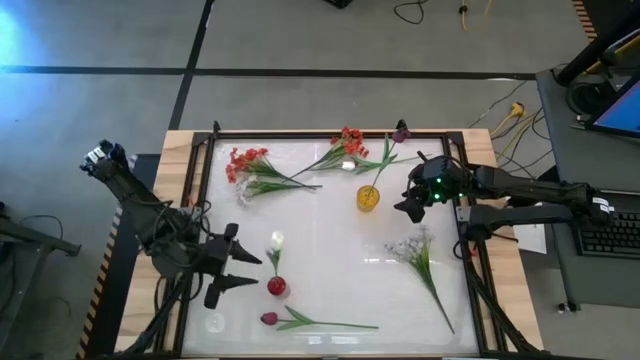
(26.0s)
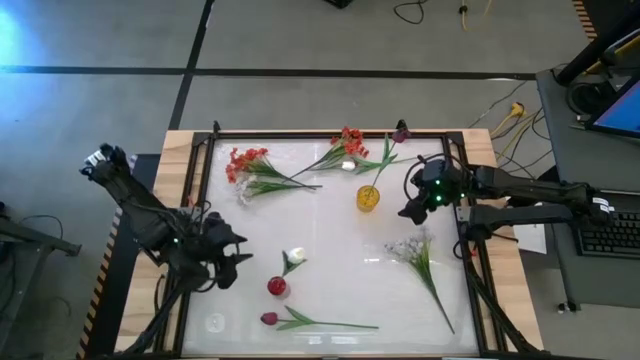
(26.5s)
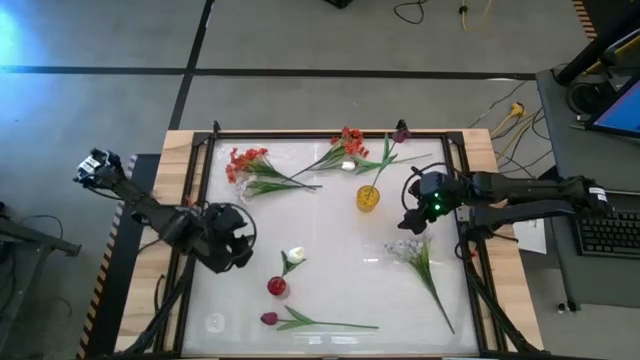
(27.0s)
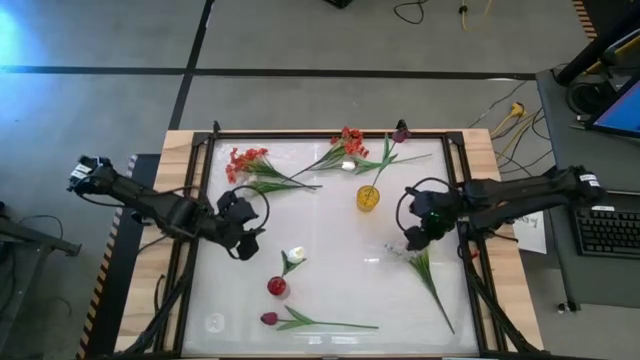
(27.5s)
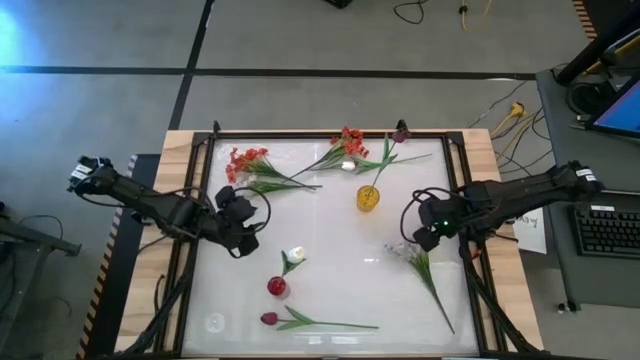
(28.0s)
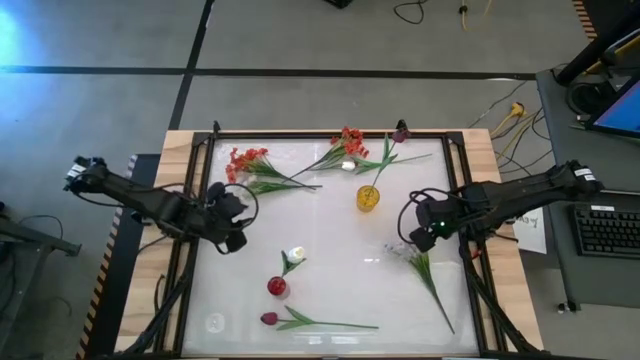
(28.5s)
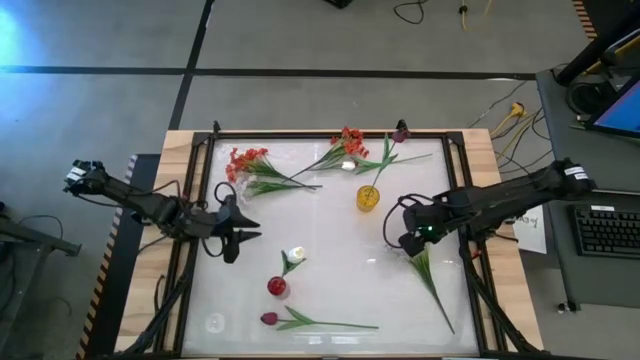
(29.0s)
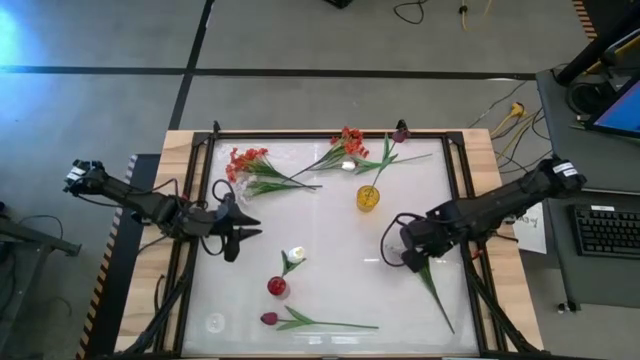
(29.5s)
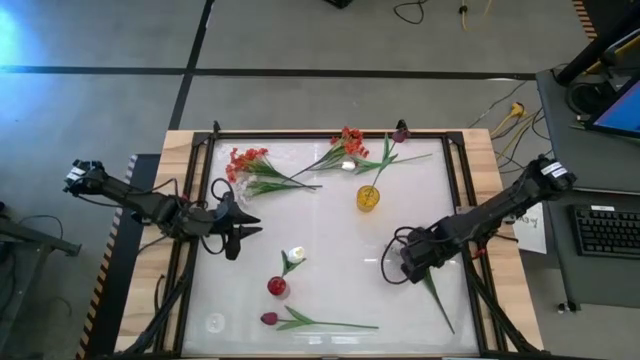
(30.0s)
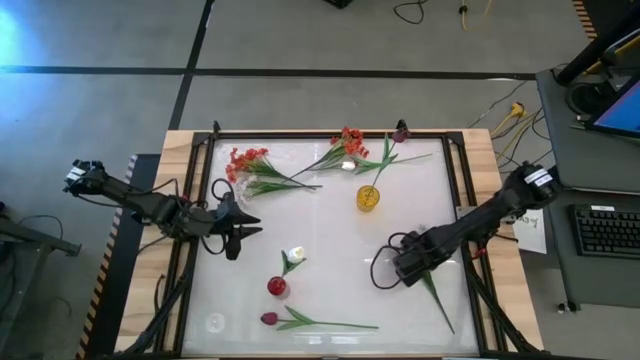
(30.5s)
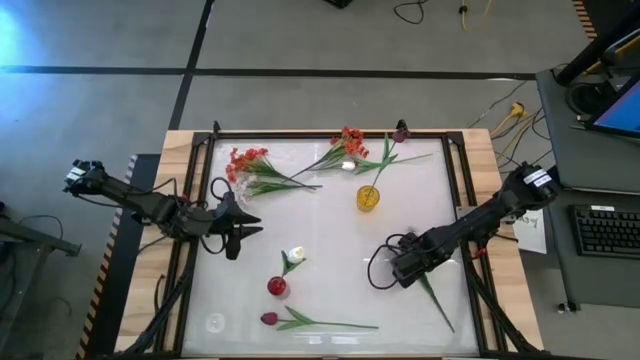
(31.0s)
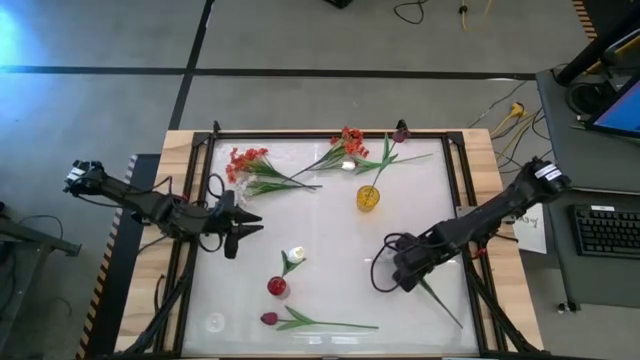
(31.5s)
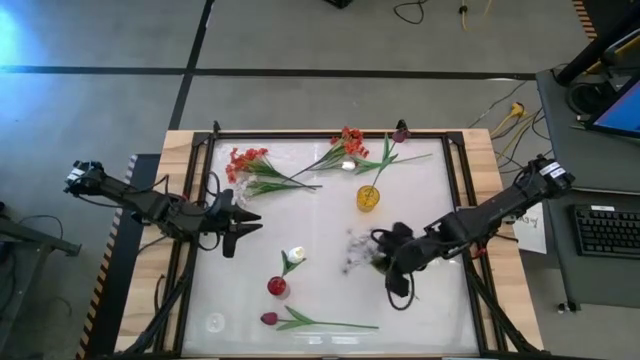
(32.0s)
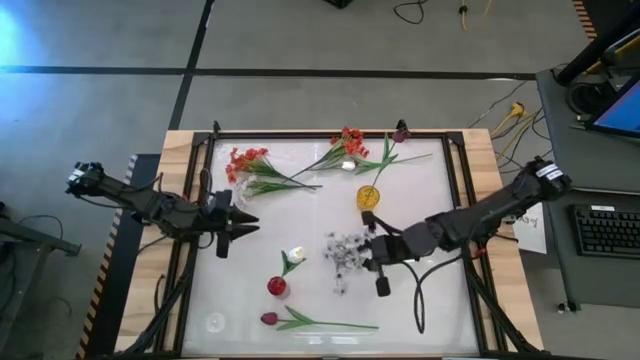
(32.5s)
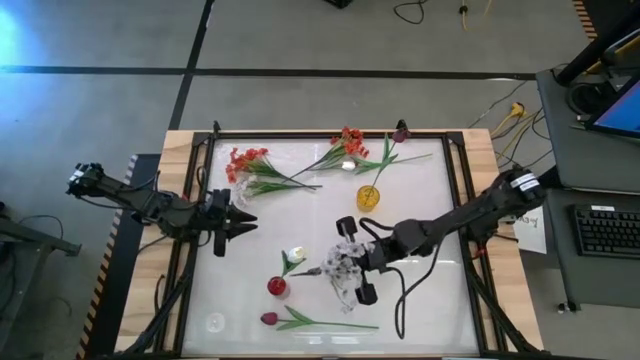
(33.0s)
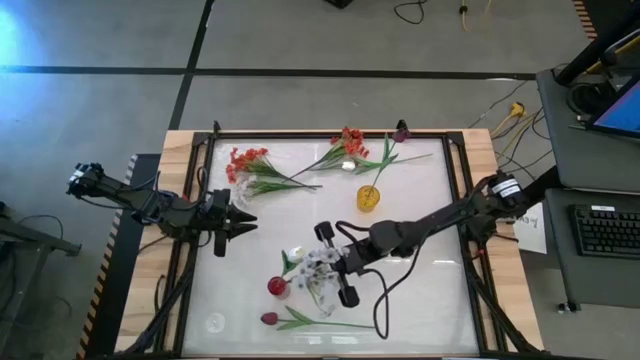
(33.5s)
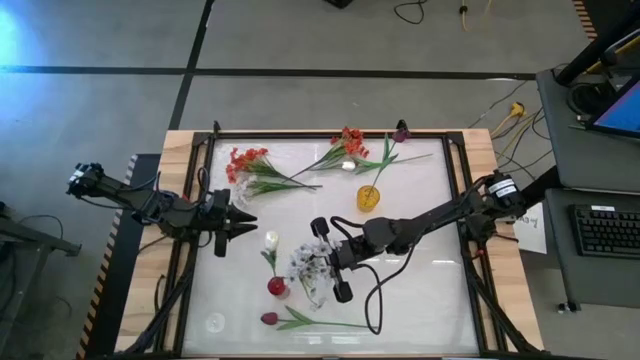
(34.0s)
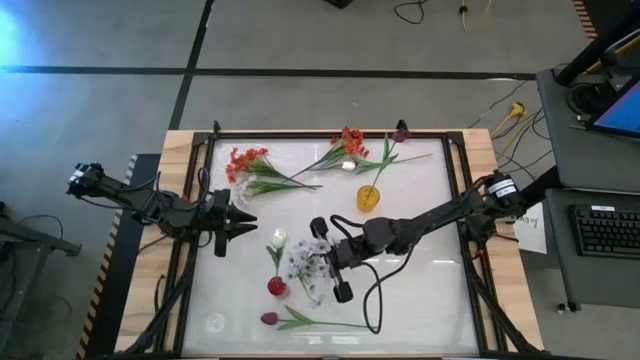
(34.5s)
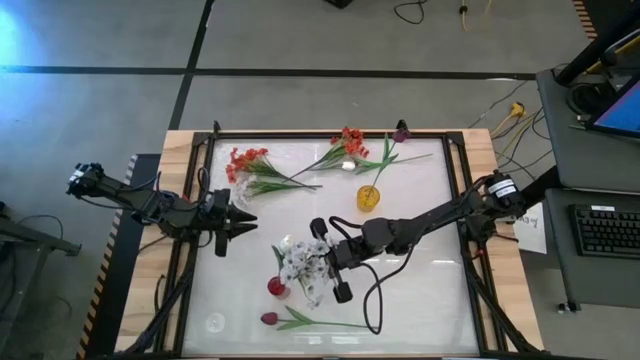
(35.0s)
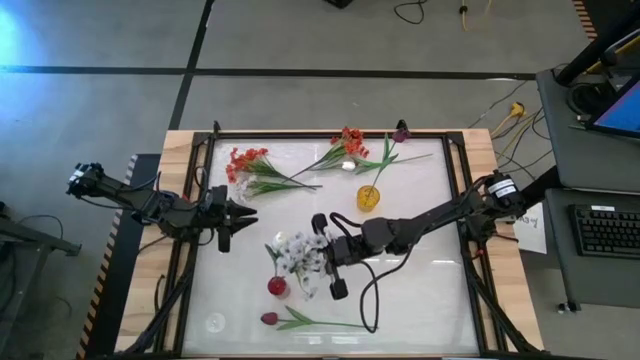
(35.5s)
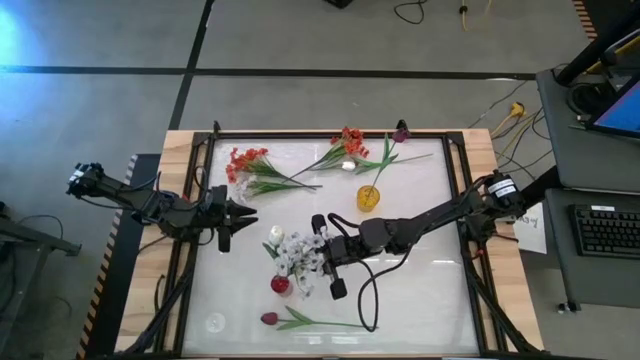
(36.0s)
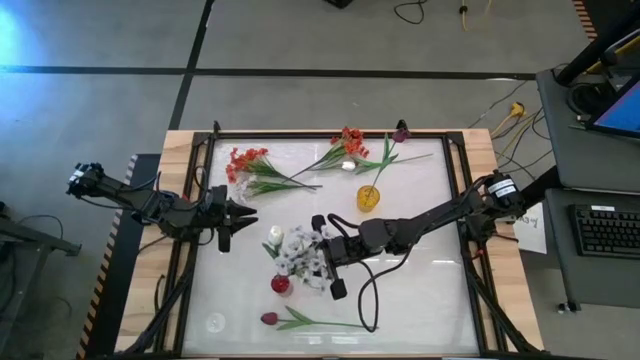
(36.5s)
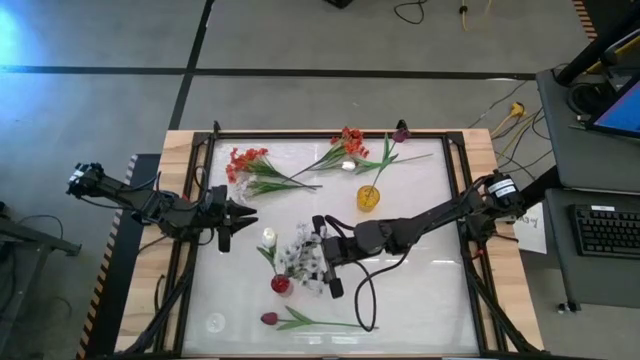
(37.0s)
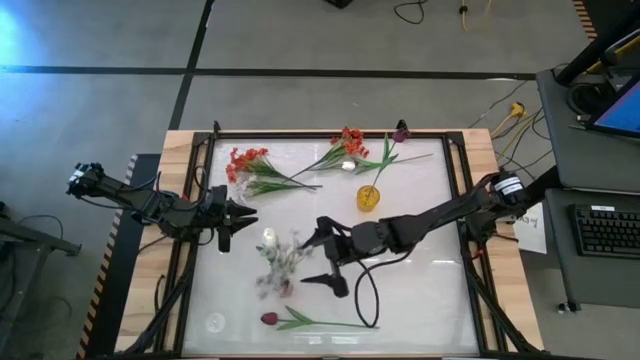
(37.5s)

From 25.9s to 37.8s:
Task: Sort flowers into vase by color
Put the bottom white flowers into the red vase

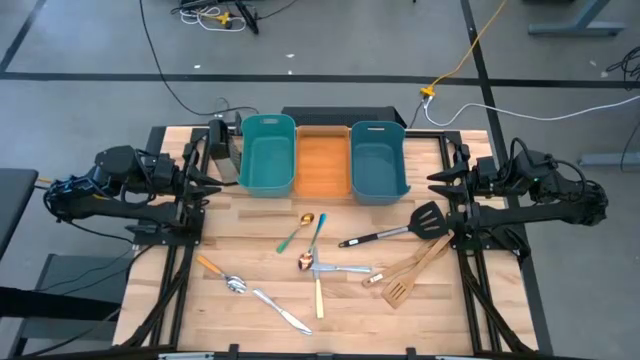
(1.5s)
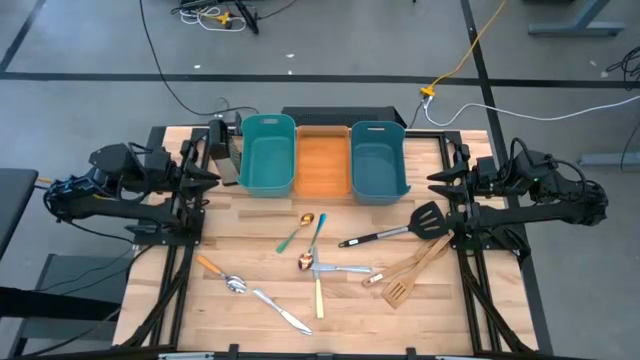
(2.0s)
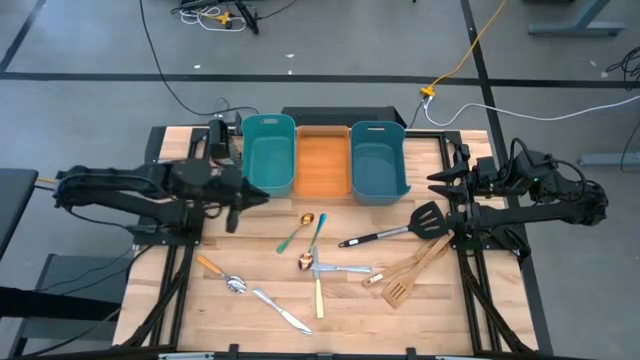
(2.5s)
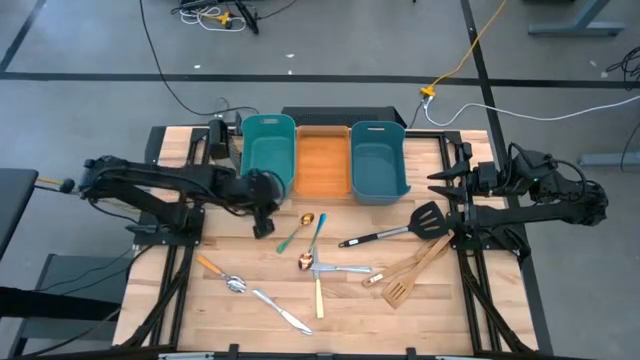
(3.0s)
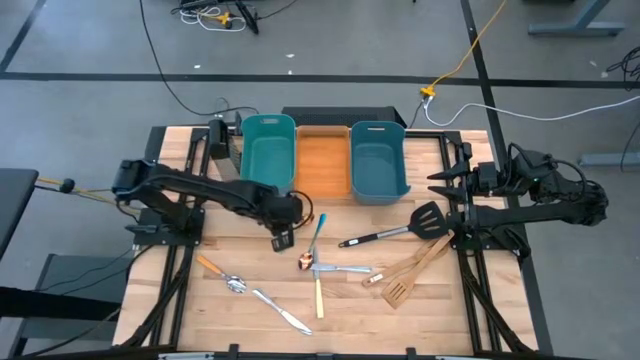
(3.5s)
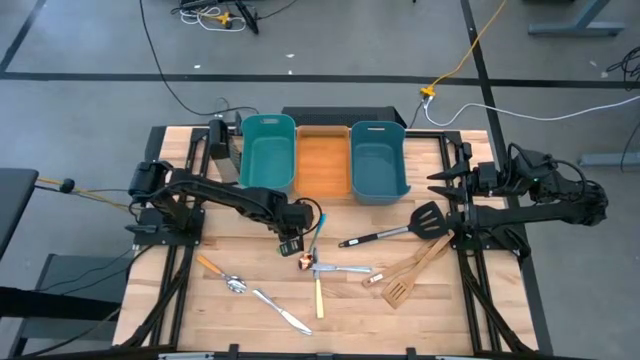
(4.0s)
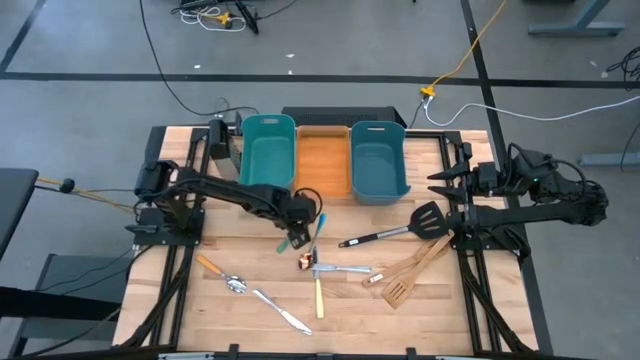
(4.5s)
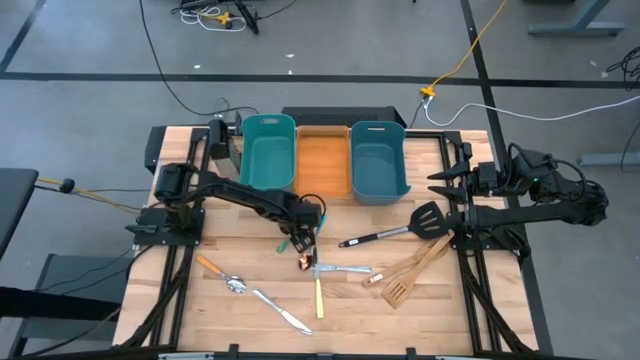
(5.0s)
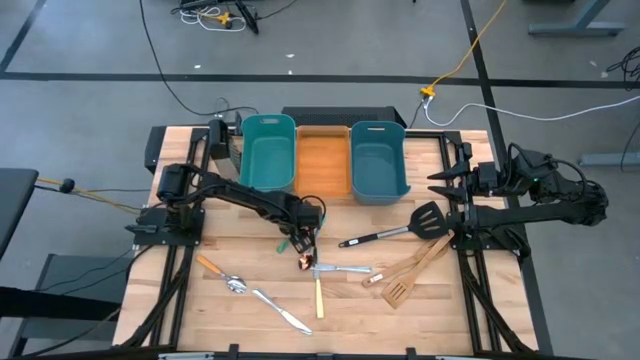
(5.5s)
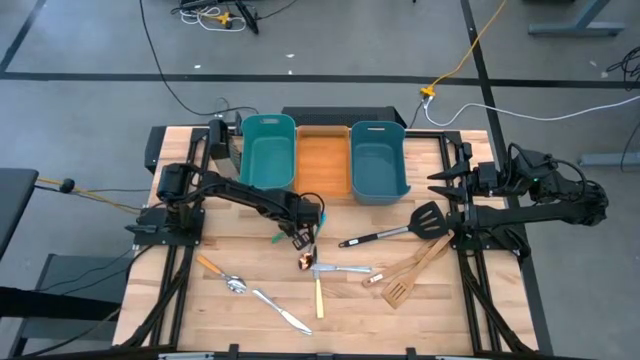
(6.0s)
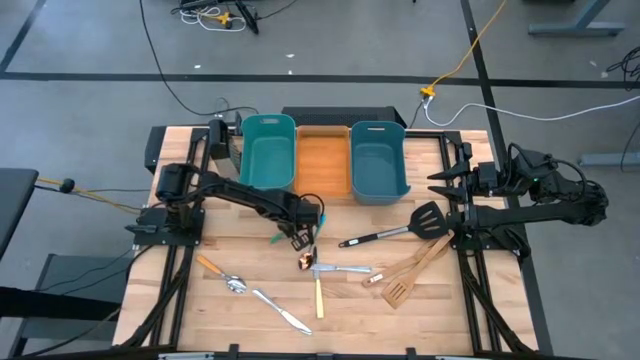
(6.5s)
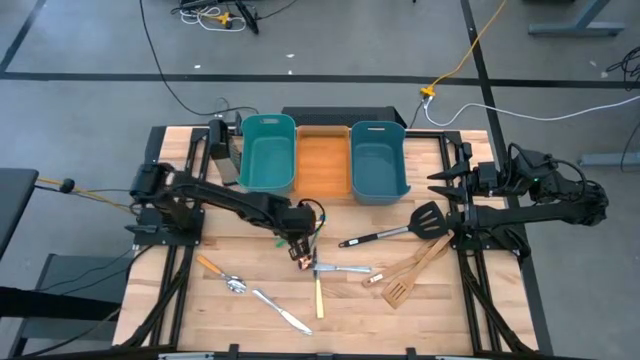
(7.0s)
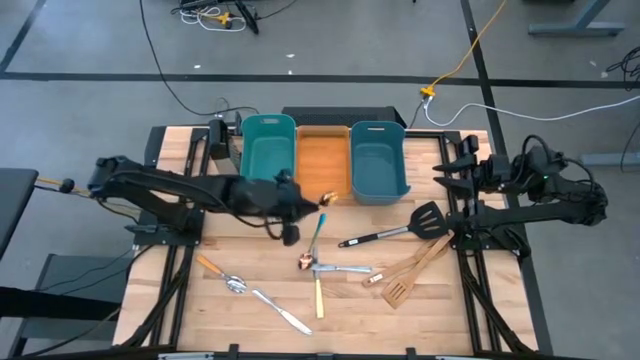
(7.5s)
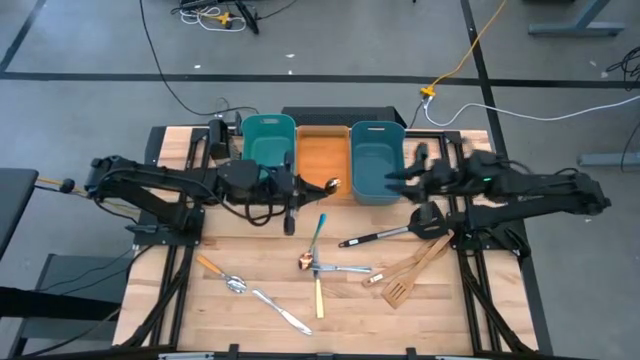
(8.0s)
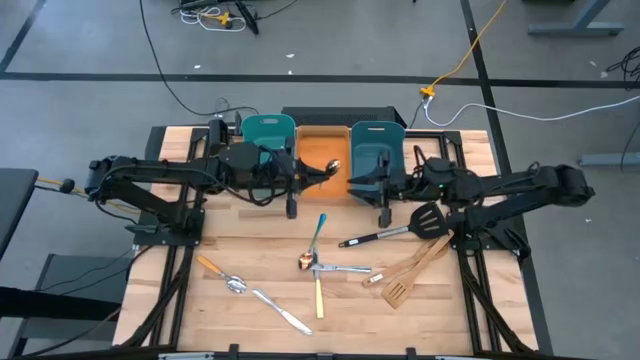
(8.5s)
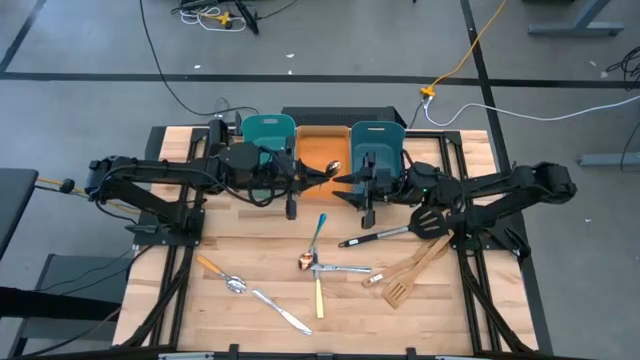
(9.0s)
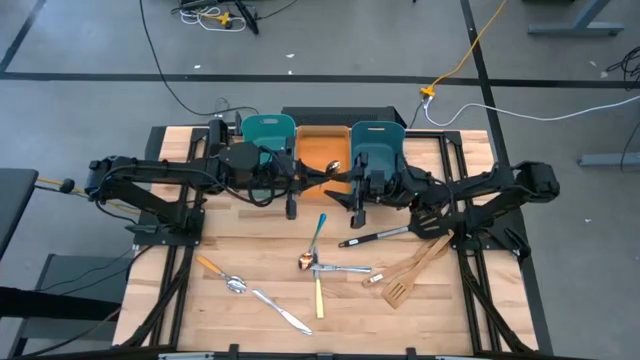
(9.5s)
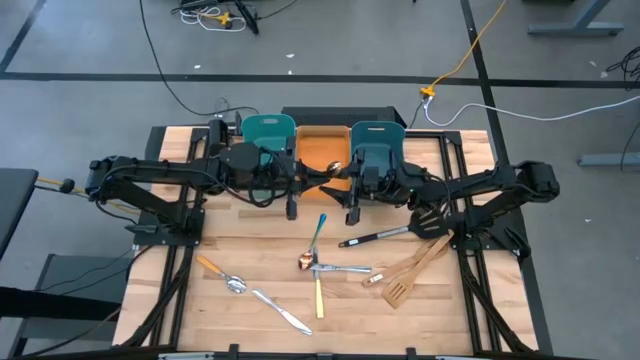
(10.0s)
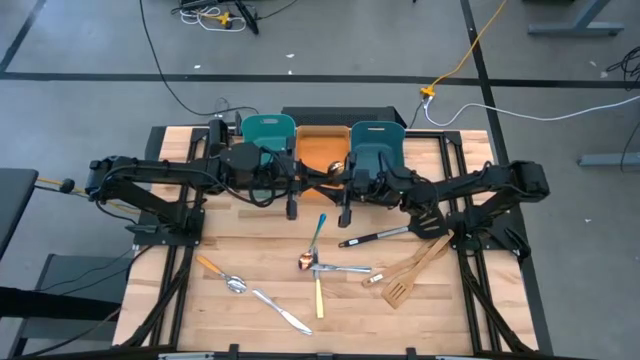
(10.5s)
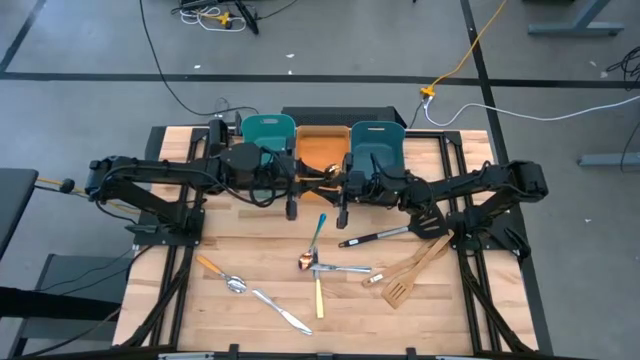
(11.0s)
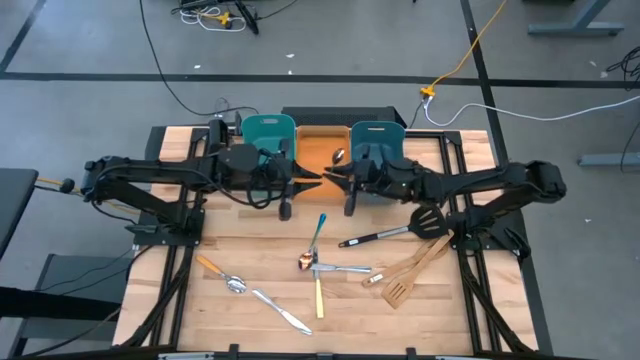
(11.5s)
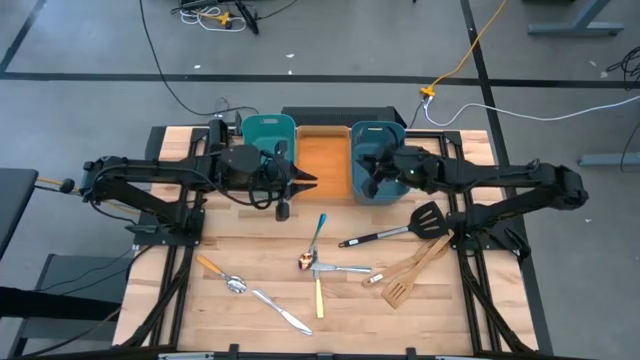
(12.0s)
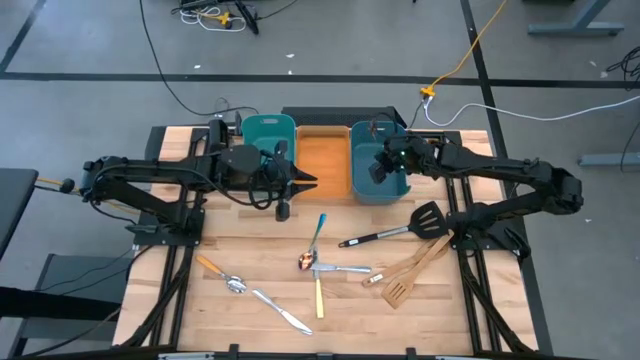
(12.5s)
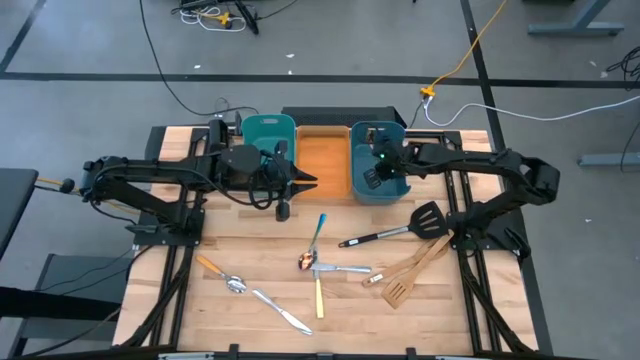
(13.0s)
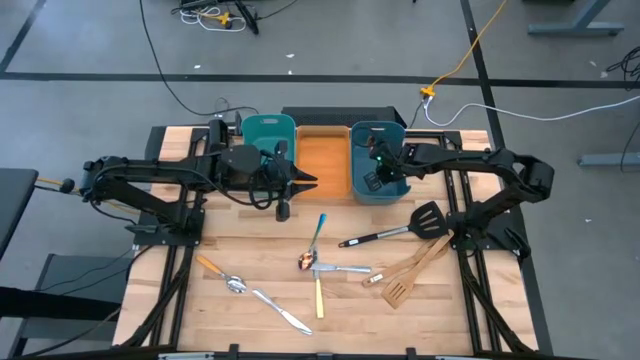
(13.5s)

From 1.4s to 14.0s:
Task: Pick & Place Kitchen Items
Put the green spoon into the dark blue bin
